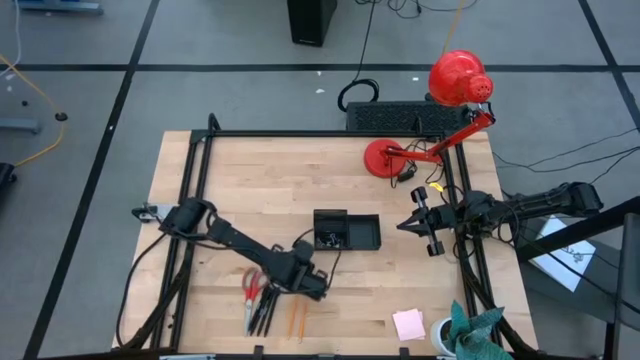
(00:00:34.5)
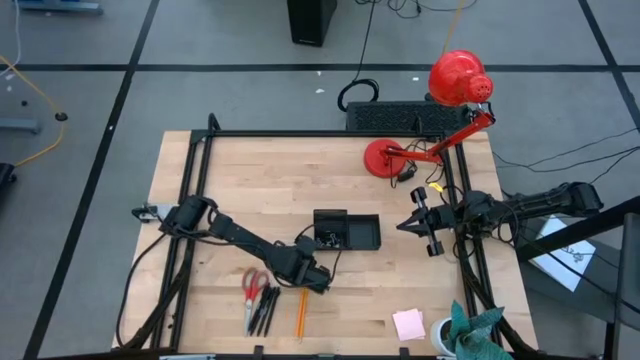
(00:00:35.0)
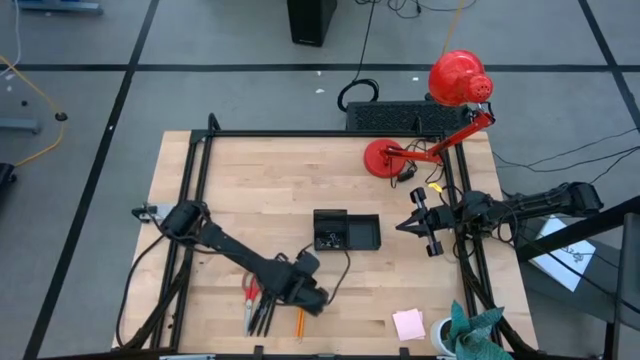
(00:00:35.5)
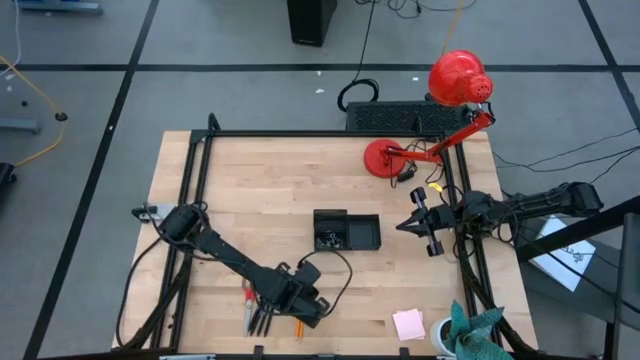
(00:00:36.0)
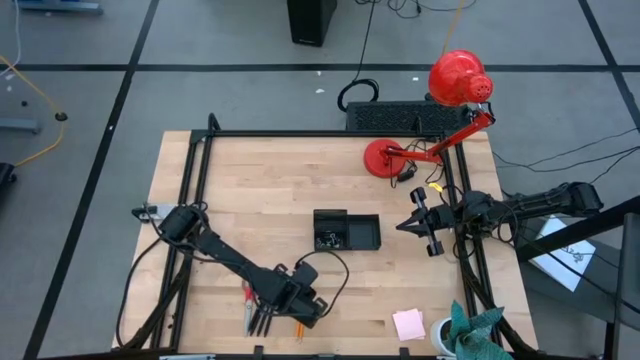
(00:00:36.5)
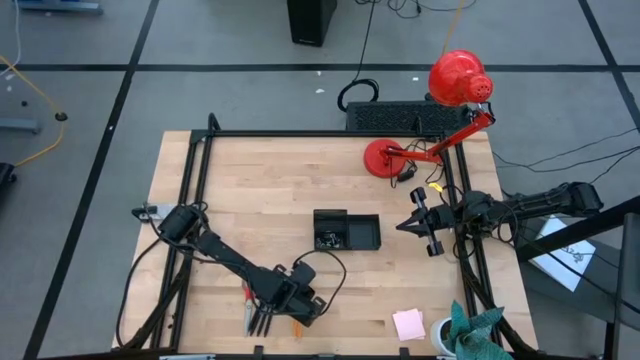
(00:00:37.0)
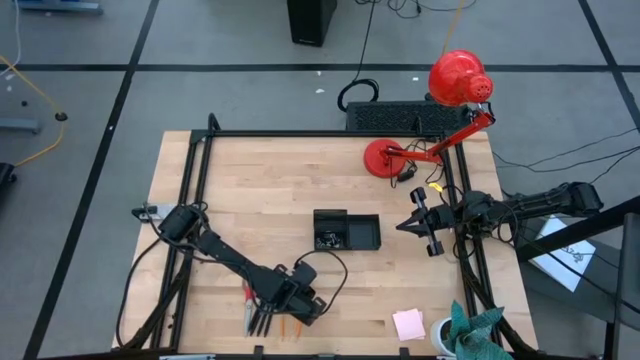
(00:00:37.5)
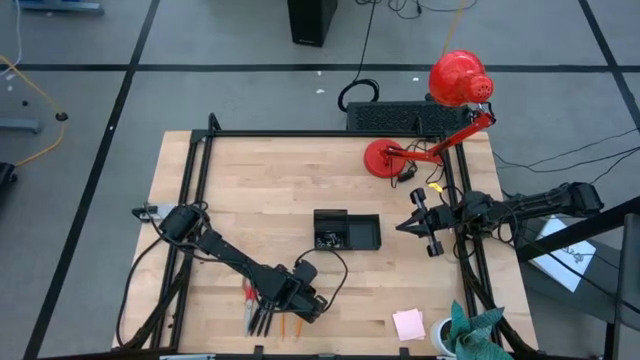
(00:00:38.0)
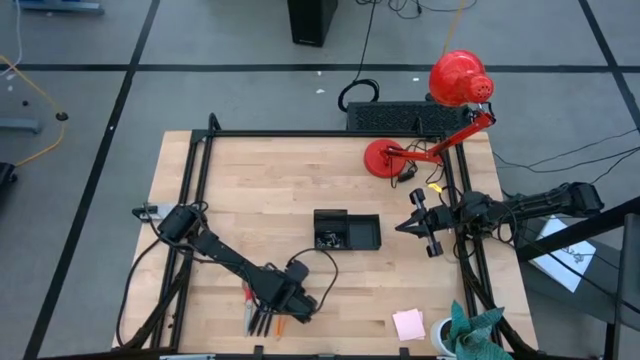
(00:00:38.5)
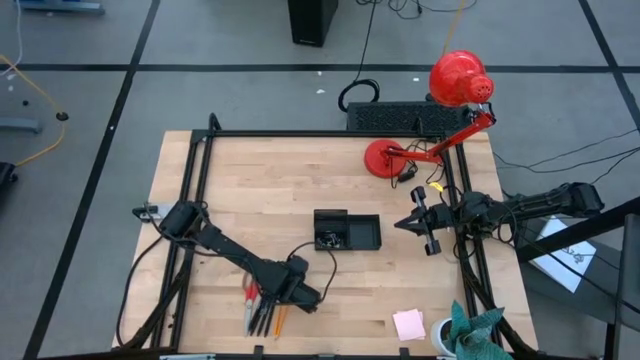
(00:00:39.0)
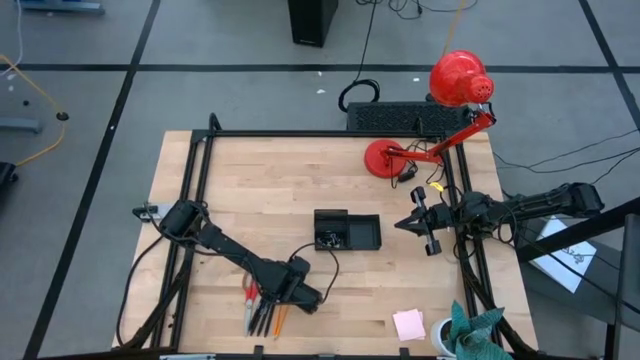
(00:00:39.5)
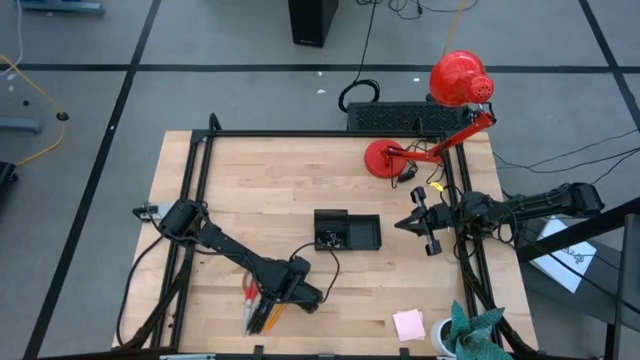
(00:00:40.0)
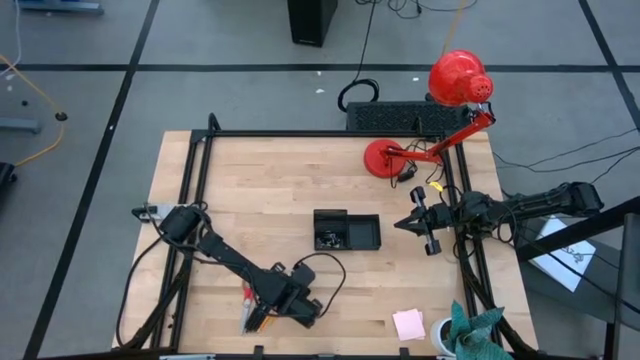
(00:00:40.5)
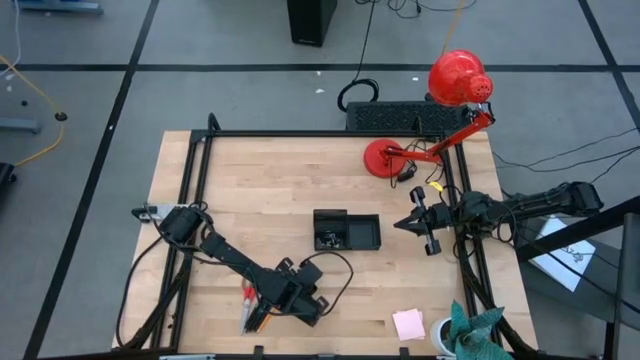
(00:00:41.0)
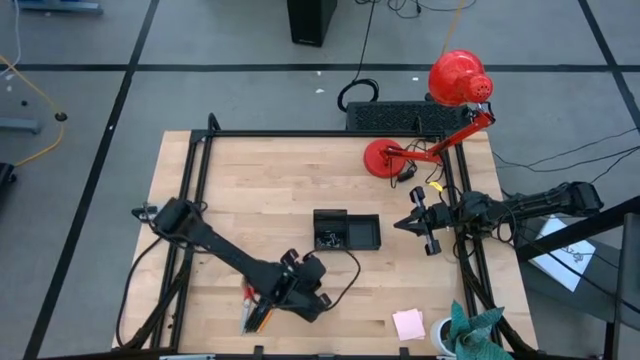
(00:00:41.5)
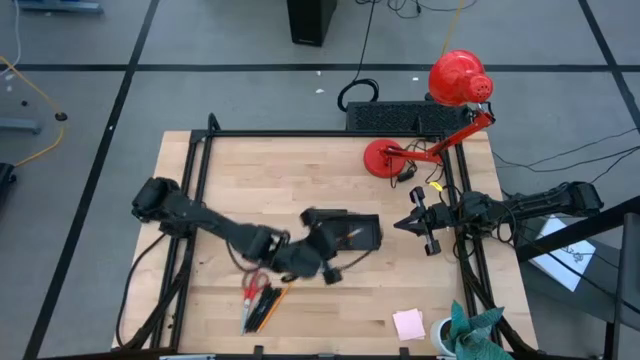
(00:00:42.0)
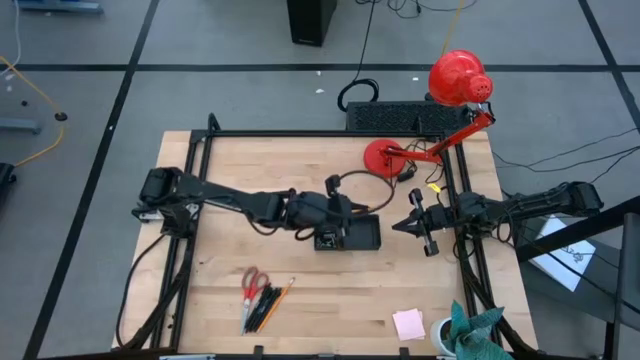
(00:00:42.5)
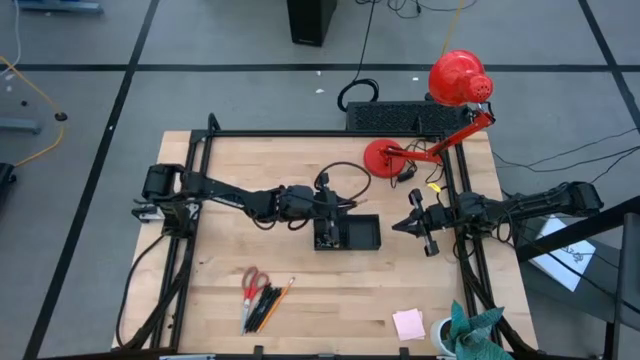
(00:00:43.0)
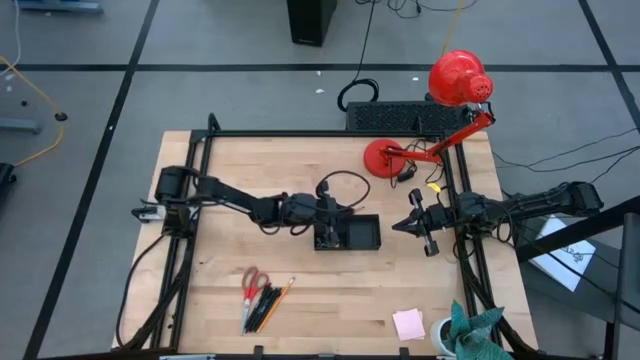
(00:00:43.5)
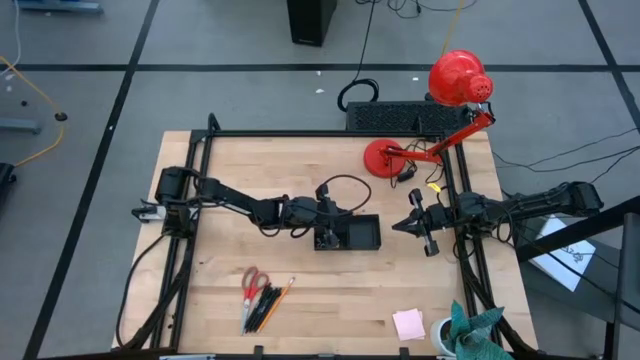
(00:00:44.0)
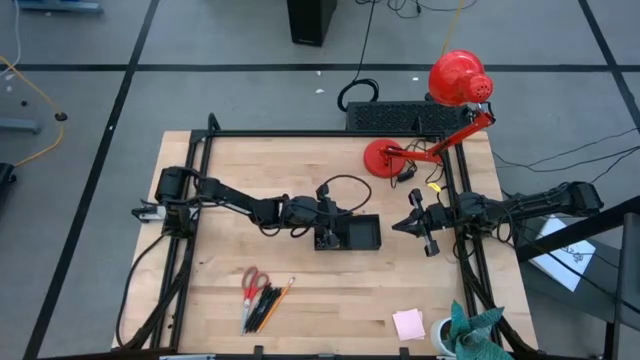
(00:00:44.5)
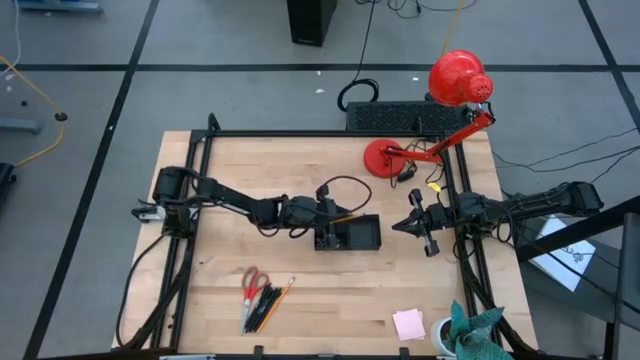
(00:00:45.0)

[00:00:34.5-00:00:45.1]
Task: Pick and place office supplies into organizer
Put the right orange pencil into the desk organizer

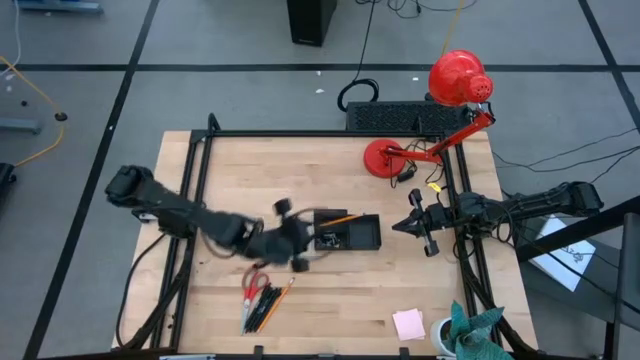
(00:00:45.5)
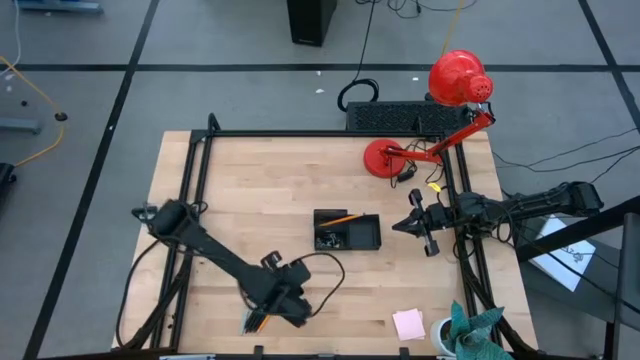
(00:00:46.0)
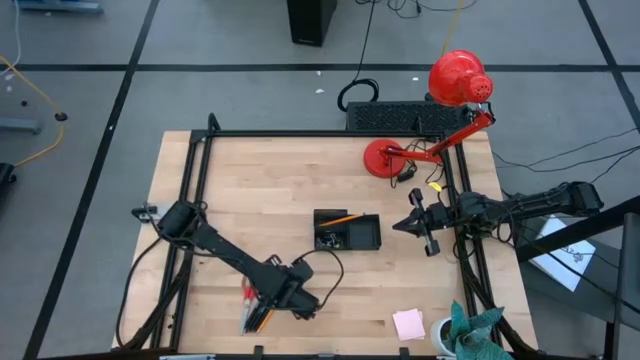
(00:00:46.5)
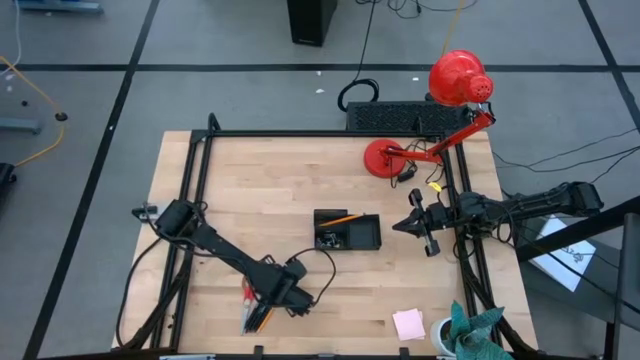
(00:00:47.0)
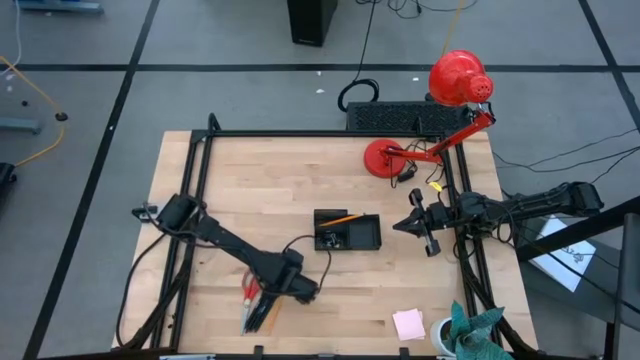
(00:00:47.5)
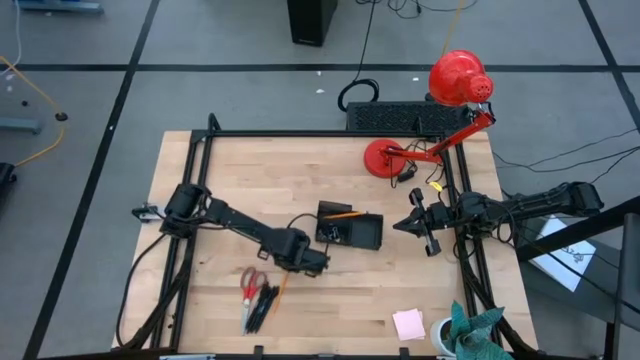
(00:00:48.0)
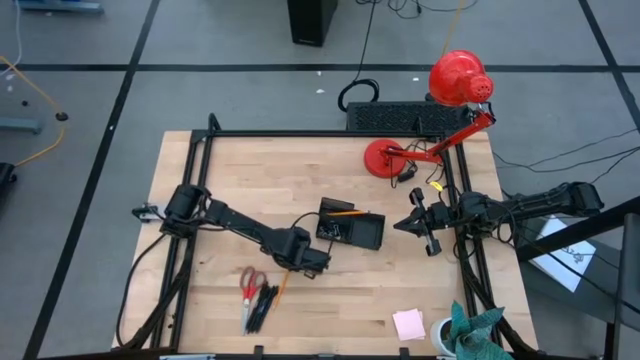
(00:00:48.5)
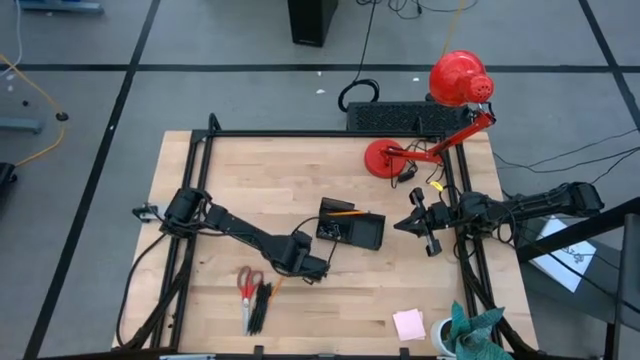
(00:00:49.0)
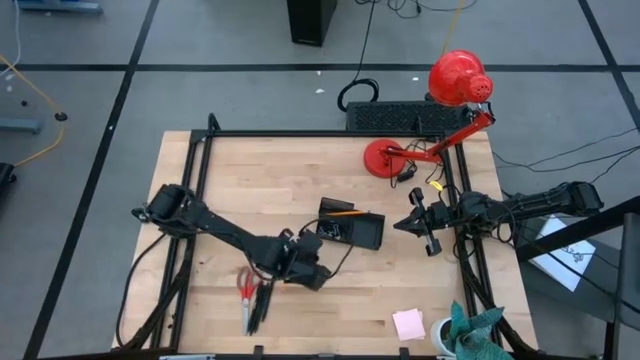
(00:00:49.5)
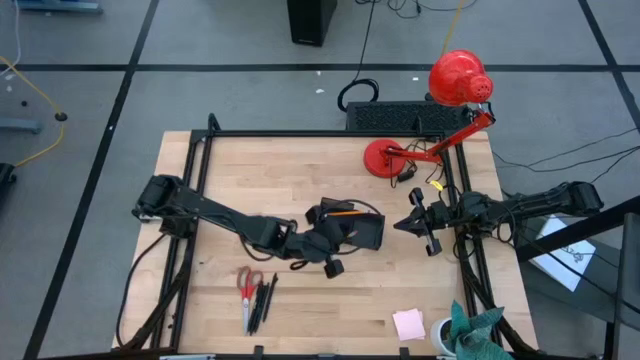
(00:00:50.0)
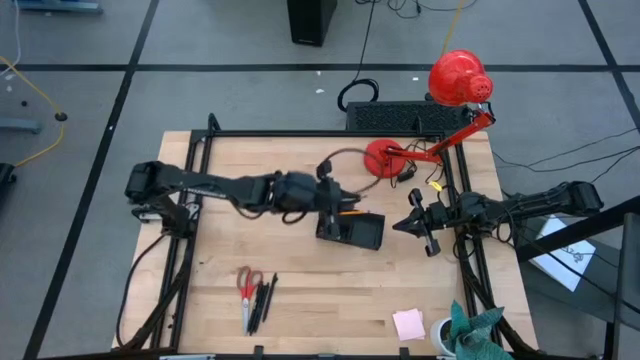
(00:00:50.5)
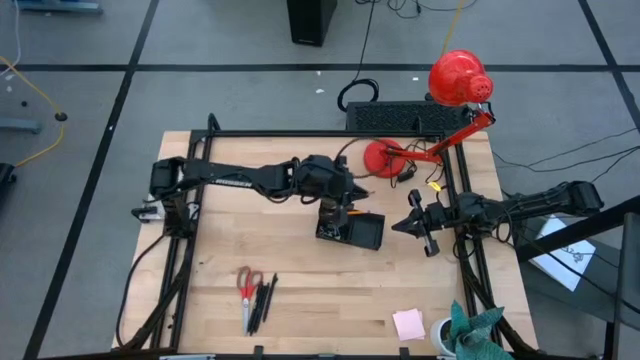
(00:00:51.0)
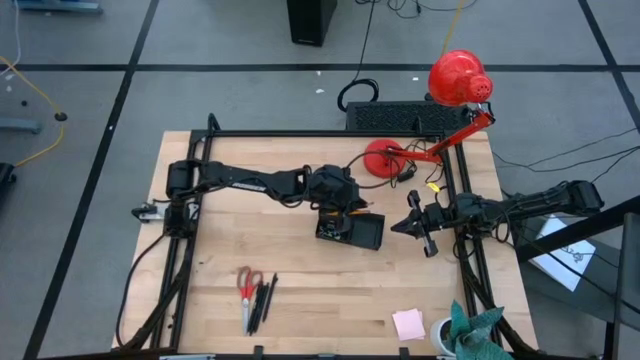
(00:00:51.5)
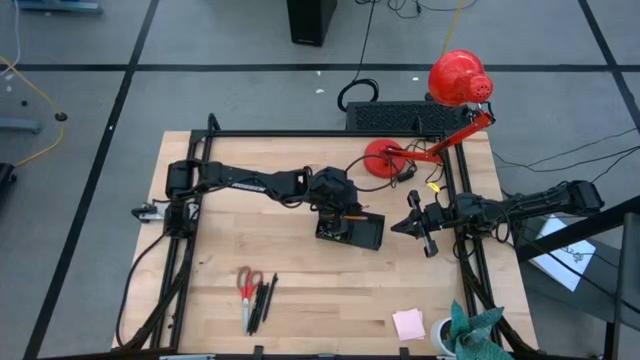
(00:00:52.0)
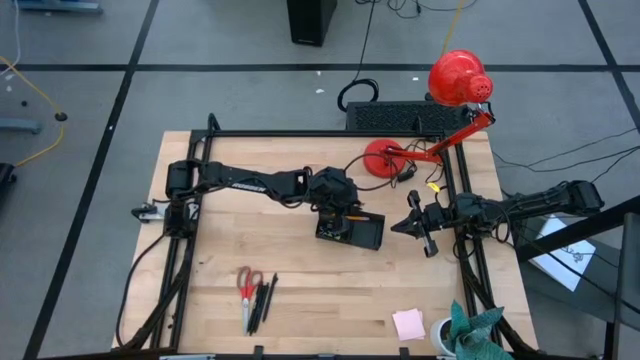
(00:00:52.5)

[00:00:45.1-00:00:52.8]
Put the orange pencil into the desk organizer

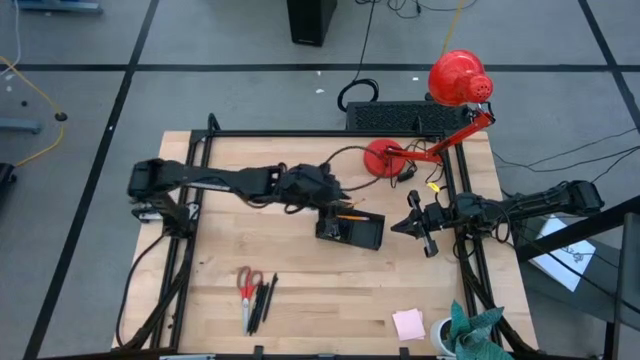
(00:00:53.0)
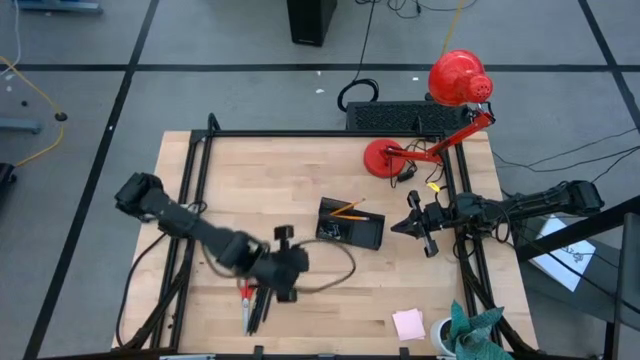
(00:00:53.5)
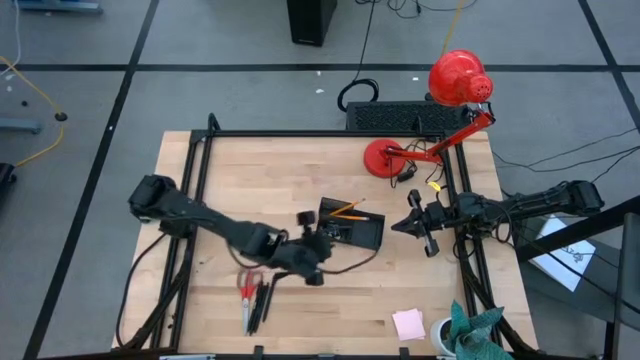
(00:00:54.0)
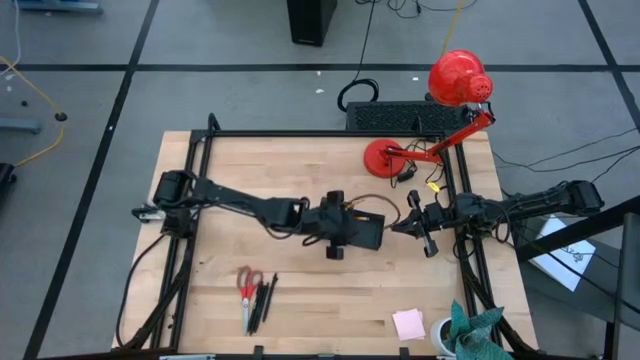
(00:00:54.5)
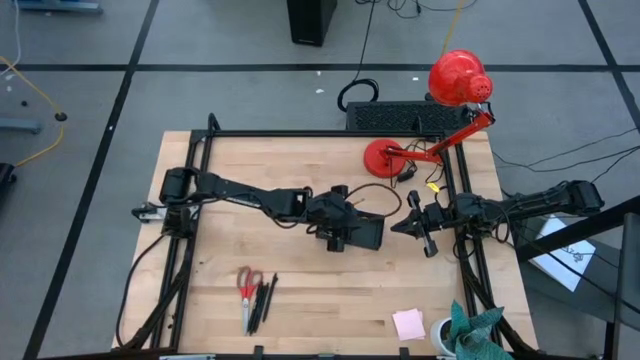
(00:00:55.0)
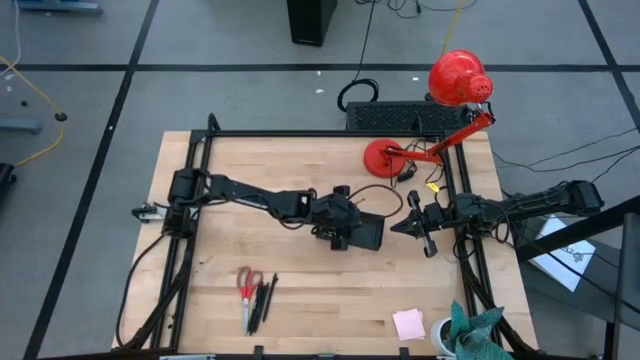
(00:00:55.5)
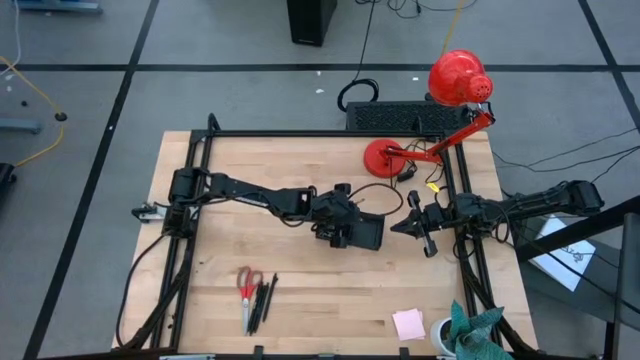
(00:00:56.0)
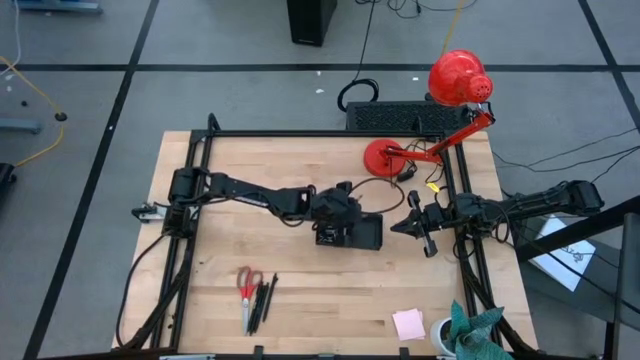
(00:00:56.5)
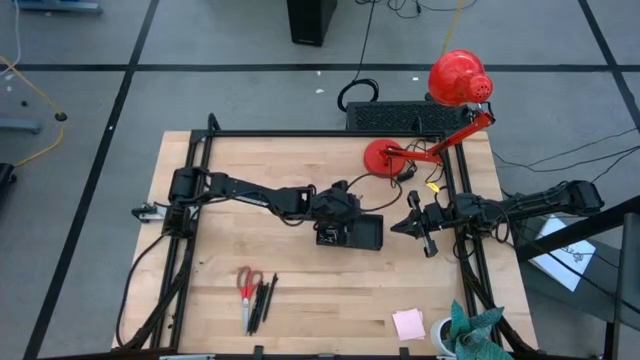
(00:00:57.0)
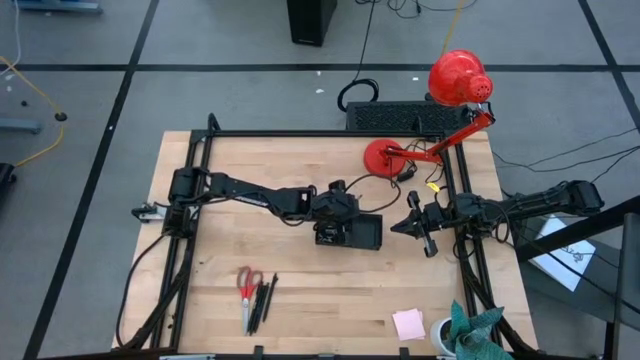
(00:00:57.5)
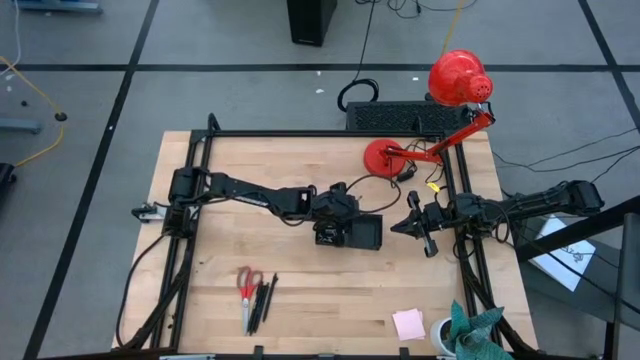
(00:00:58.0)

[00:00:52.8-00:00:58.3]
Adjust the orange pencil in the organizer bin
